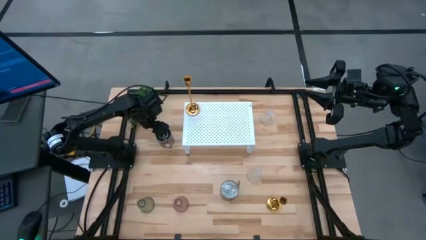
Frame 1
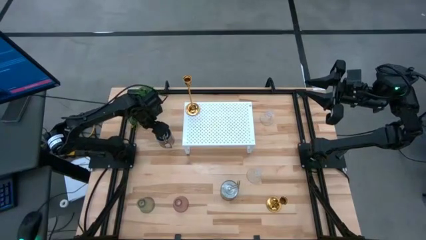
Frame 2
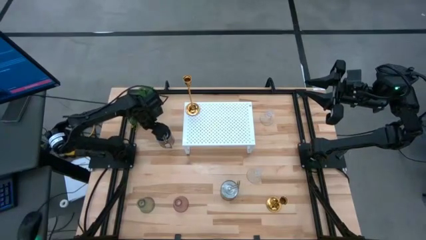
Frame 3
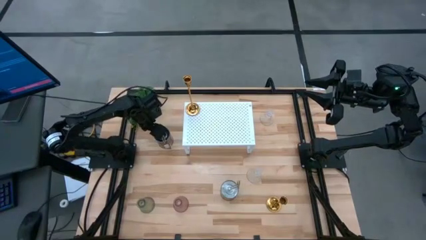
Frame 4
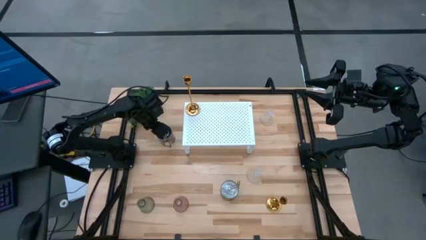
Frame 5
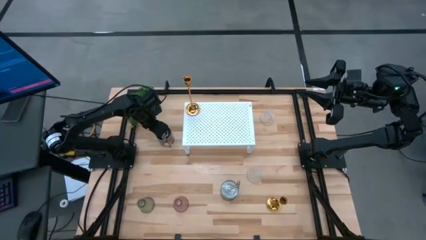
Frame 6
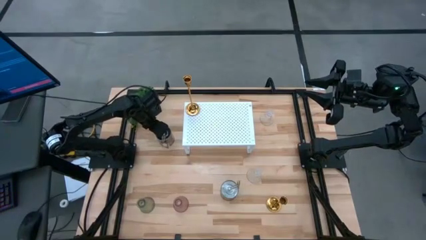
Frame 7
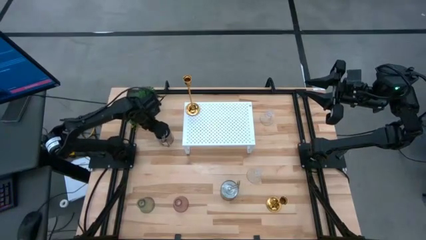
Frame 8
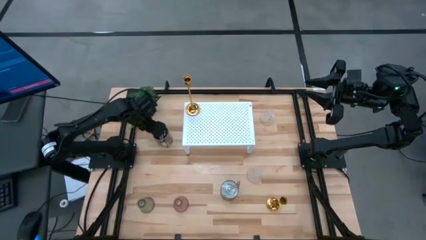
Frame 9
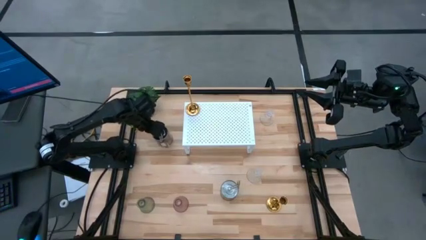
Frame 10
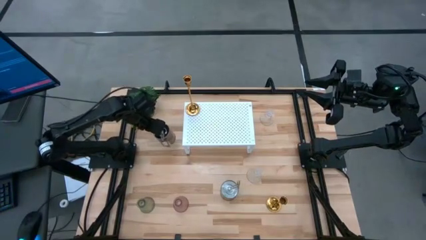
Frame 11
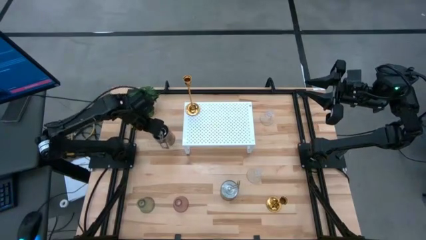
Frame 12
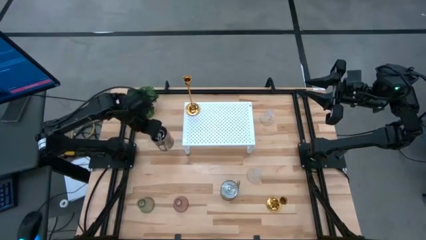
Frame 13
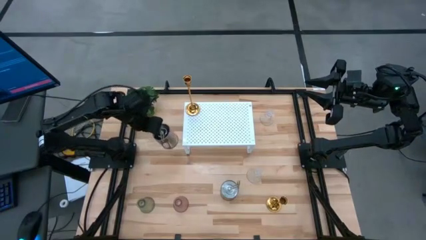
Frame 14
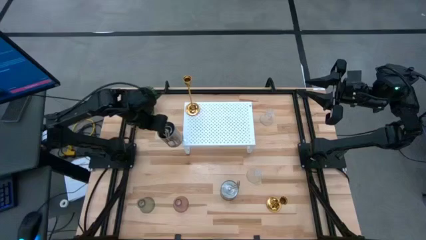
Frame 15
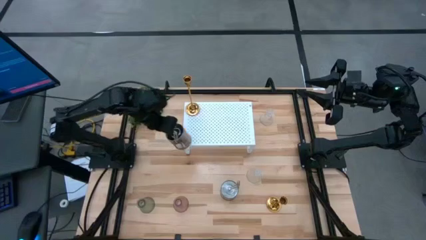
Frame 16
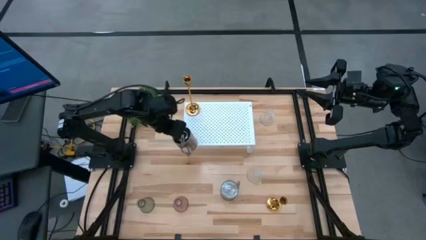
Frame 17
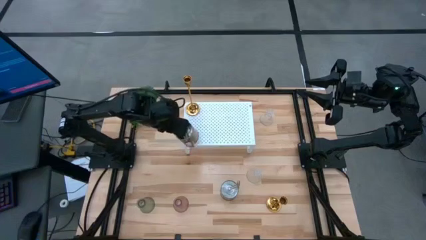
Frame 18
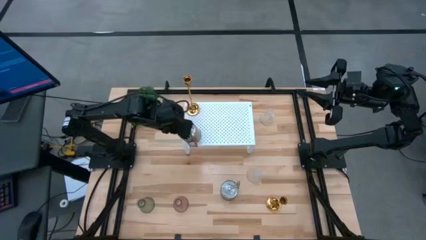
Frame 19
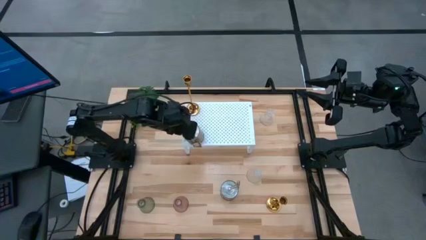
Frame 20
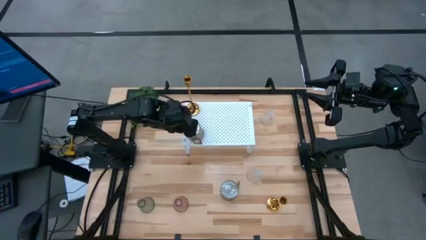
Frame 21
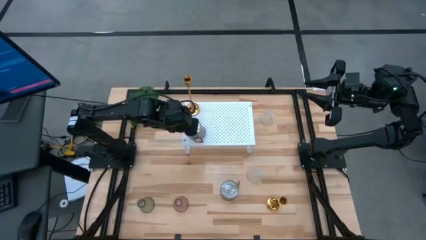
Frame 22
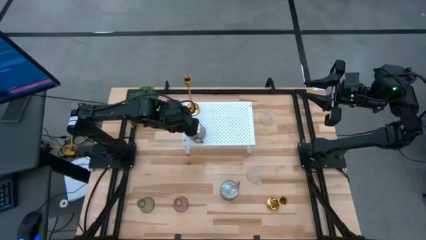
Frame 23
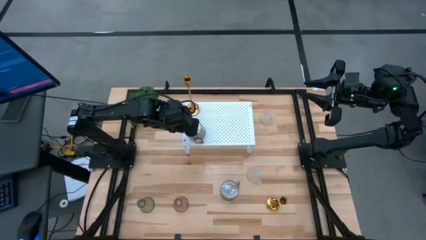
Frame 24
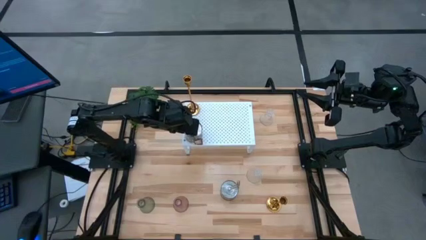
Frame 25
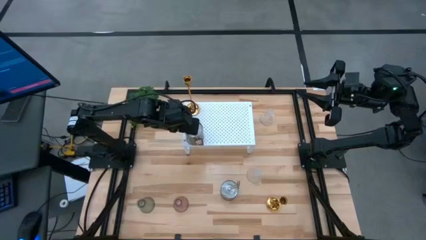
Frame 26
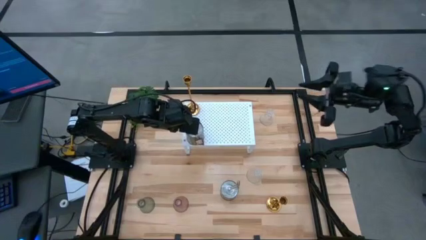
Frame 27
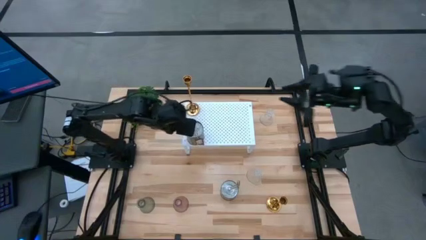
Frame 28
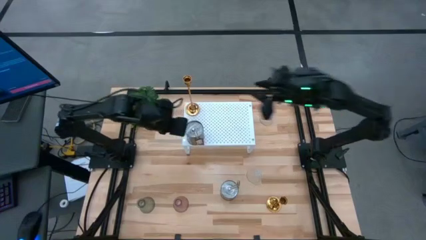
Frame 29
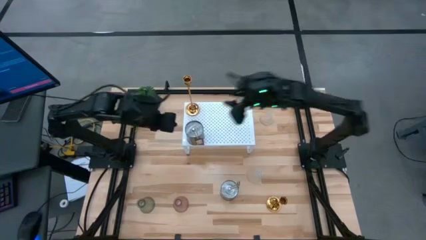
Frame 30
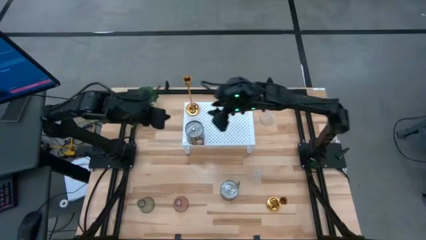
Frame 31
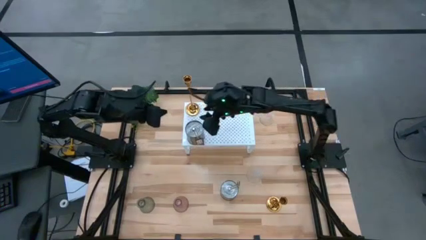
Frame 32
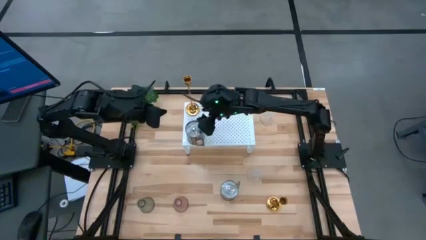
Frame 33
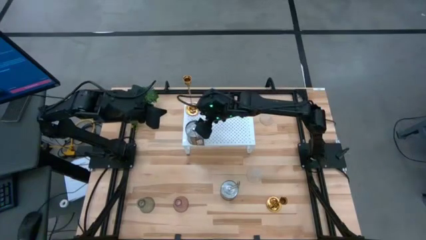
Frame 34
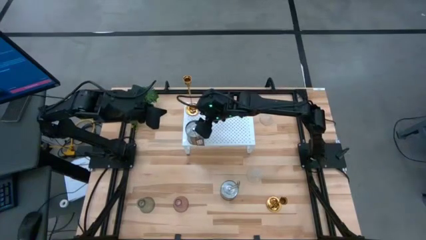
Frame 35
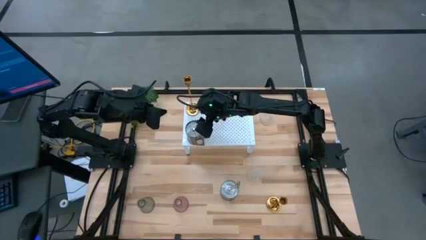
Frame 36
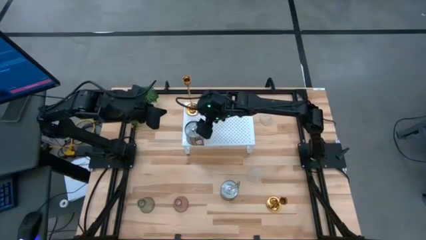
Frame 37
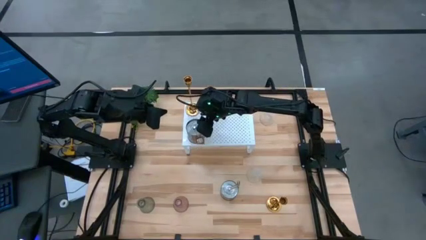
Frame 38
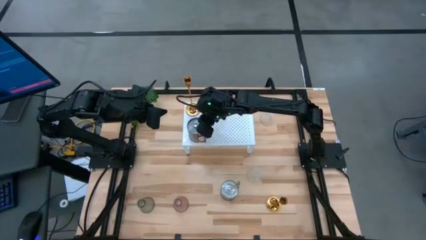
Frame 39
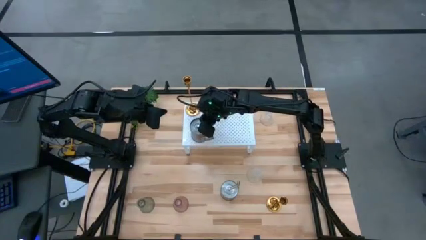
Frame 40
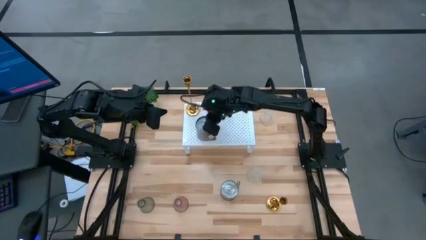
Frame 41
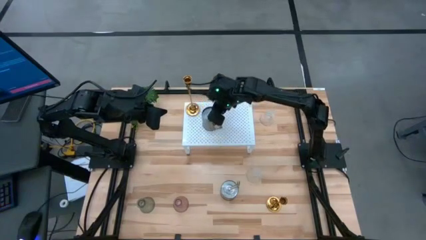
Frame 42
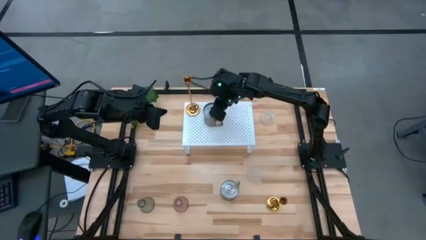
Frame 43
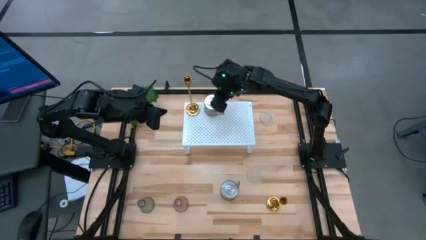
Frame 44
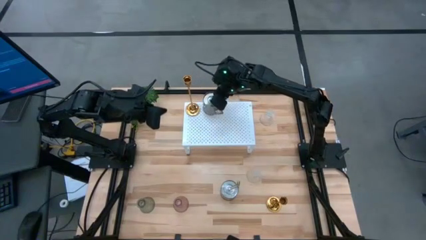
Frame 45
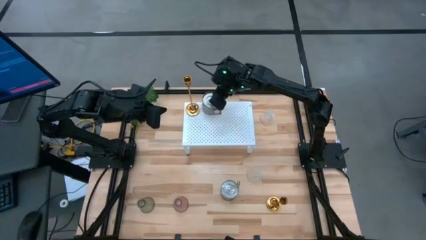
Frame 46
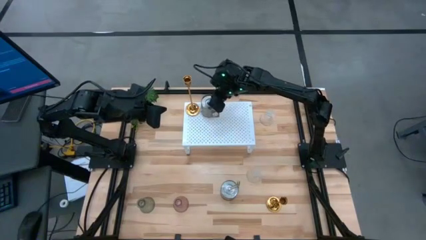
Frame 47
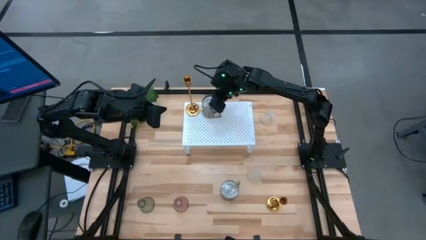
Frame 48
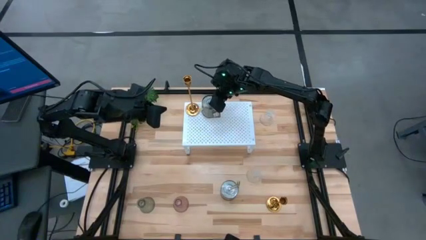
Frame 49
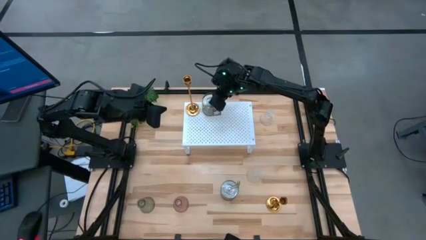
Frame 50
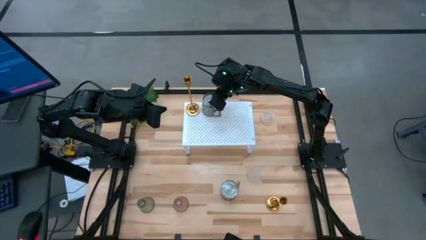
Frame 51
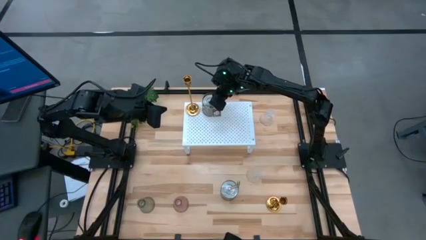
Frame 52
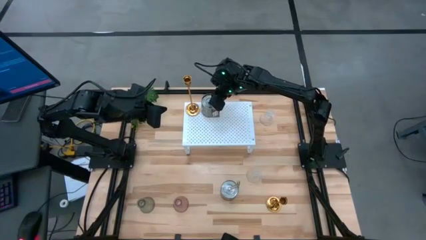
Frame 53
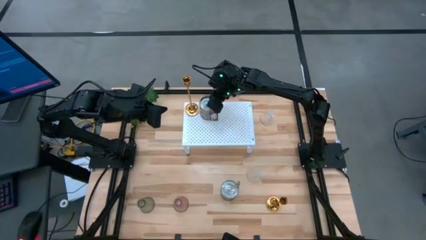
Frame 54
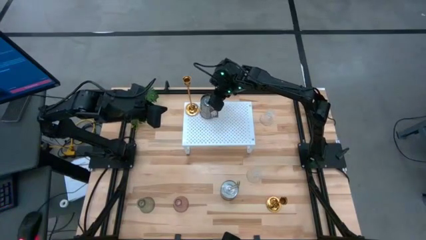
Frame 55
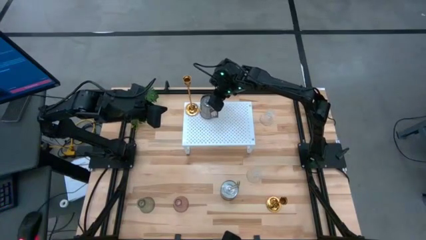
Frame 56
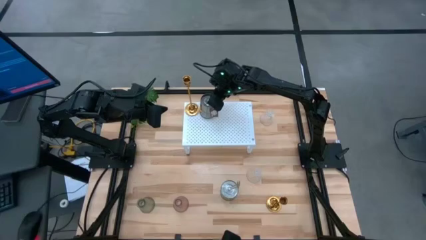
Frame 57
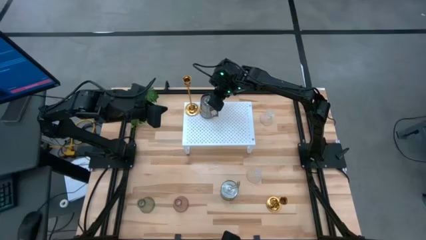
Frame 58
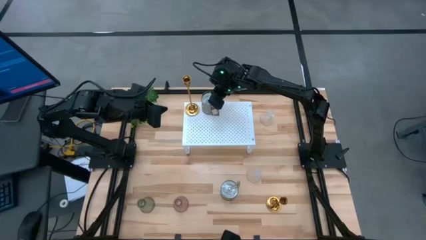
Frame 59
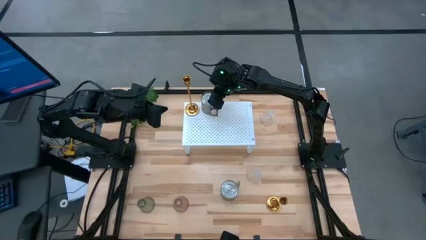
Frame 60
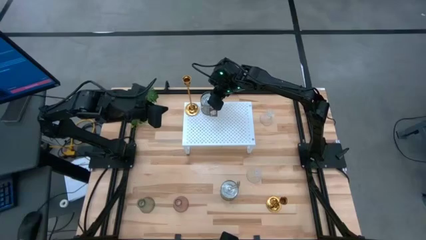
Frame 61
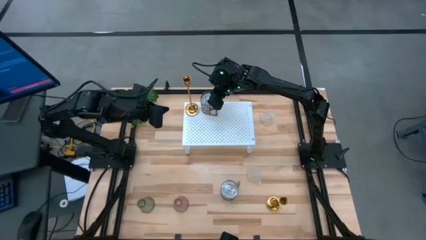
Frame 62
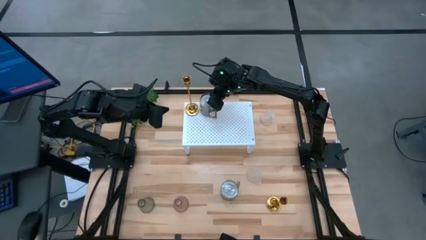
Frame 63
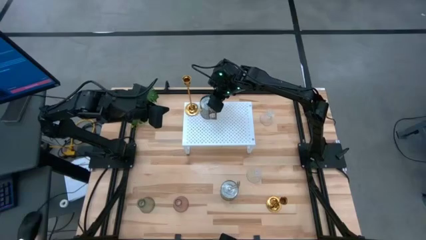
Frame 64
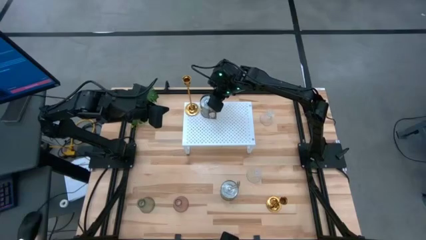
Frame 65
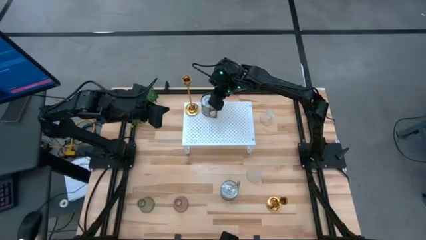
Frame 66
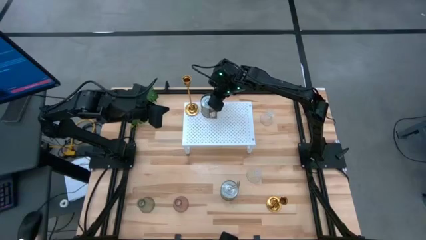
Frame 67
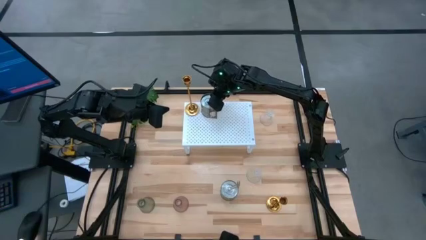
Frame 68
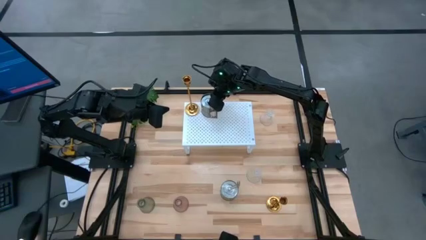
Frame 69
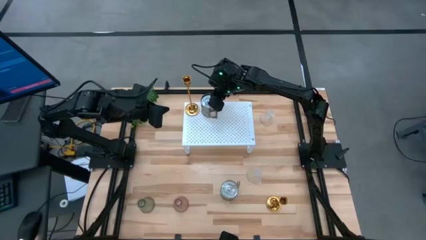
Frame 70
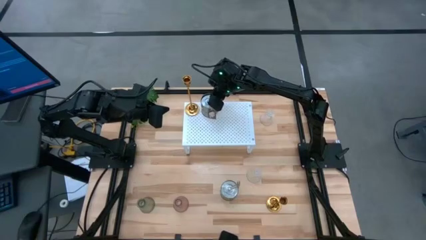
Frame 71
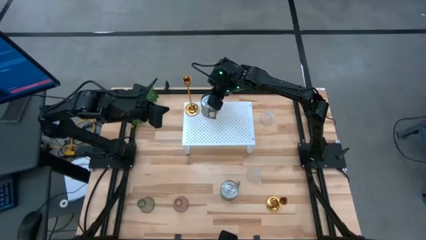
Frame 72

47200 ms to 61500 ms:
Task: Pick & Place candle stick holders
Put the top silver scented candle on the shelf
